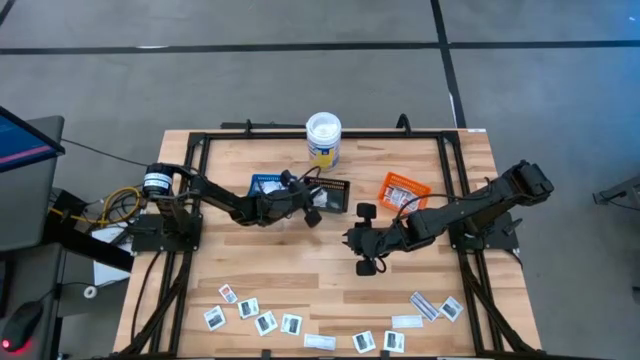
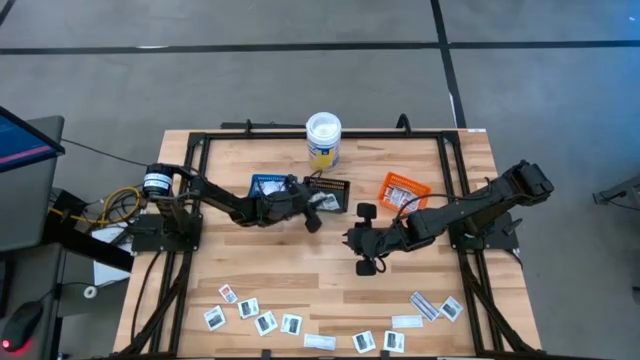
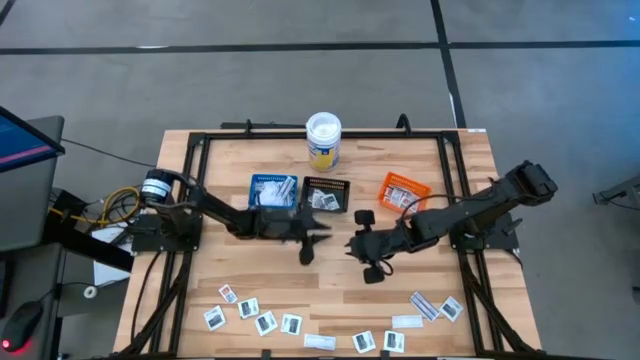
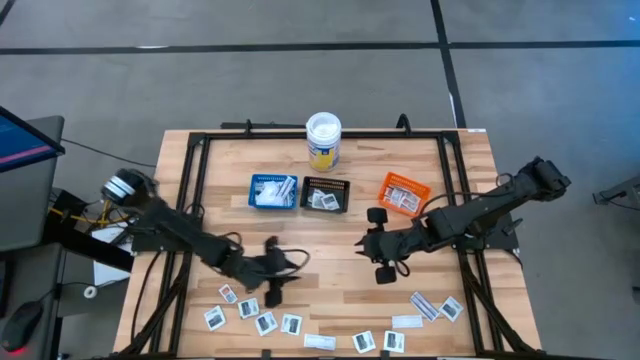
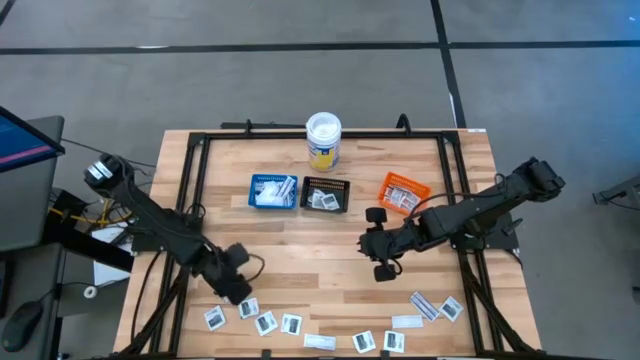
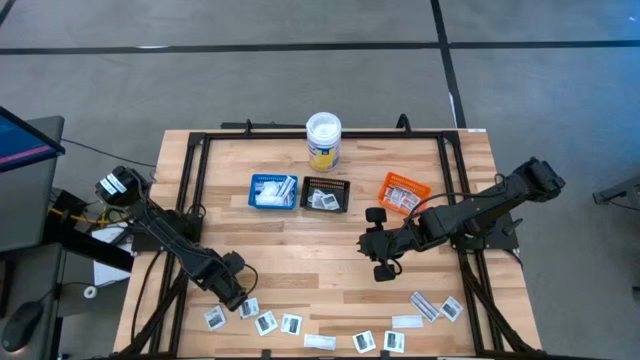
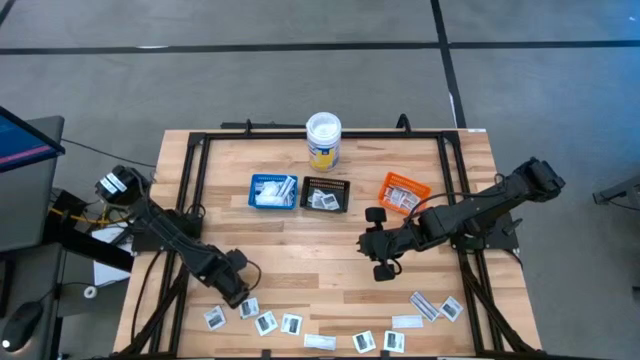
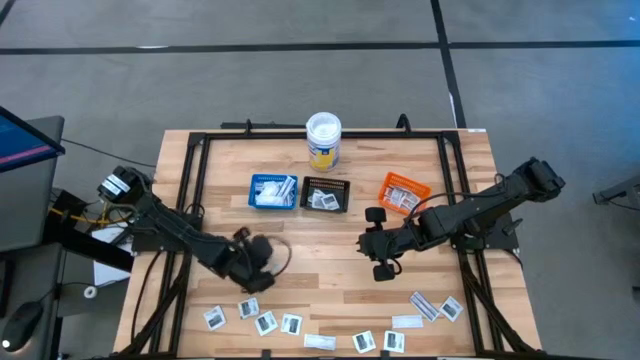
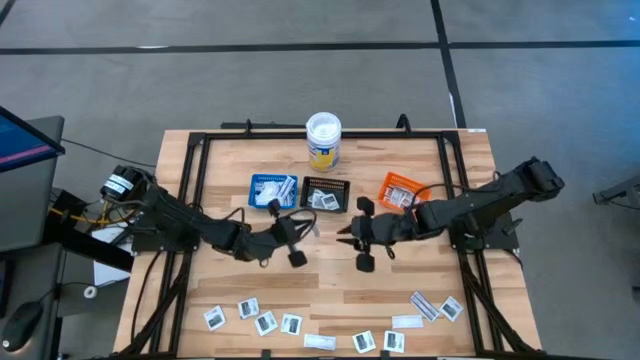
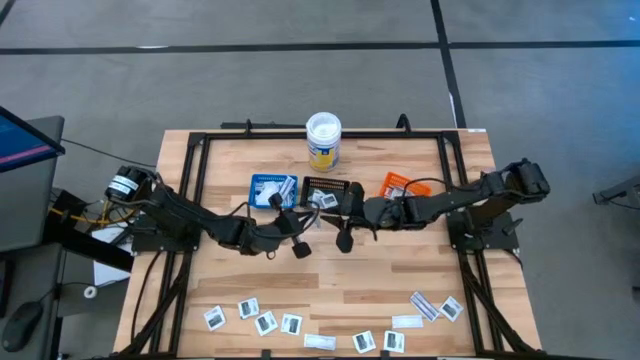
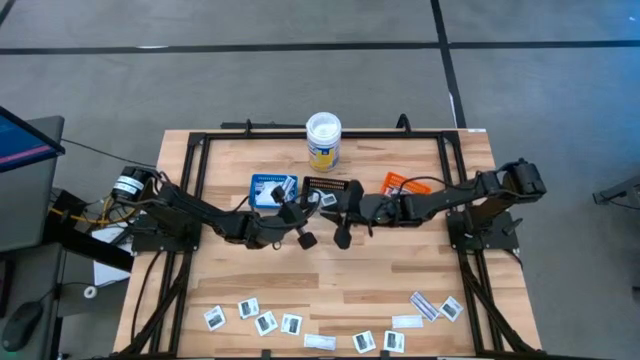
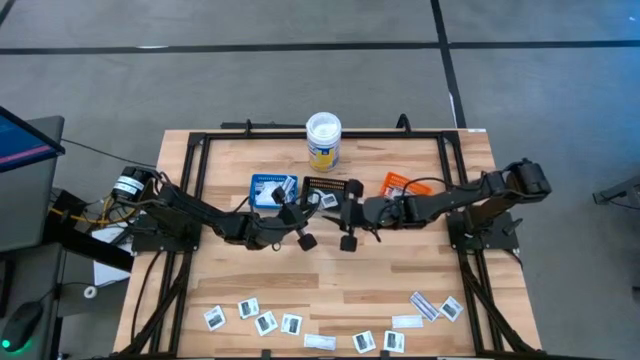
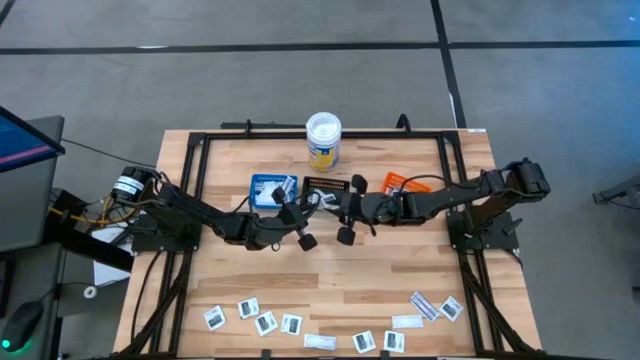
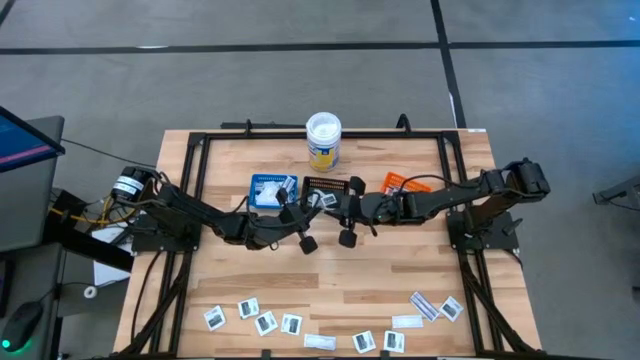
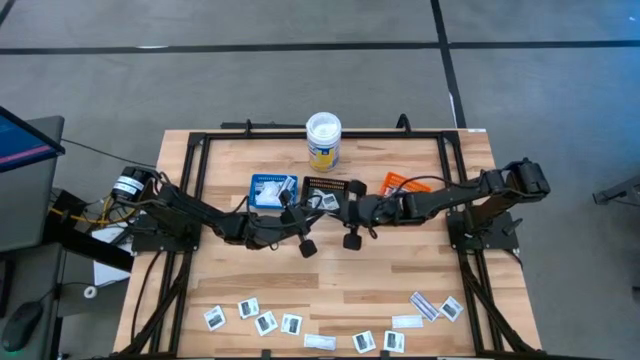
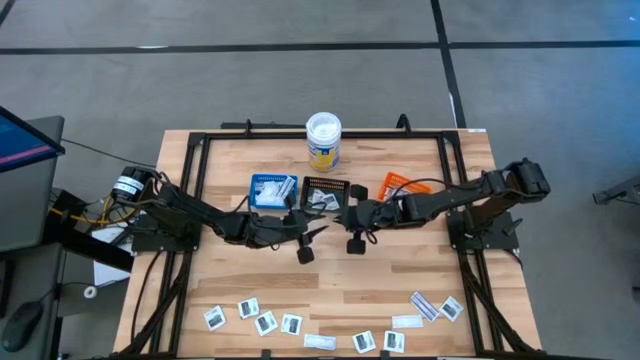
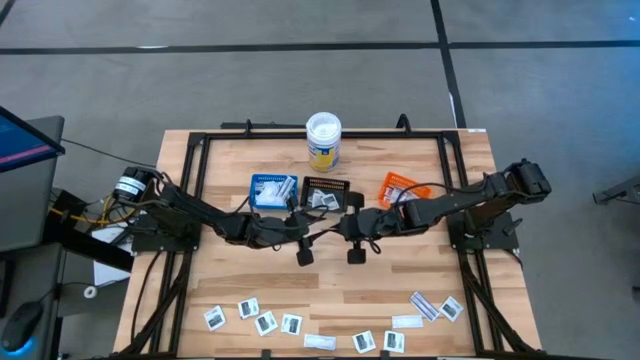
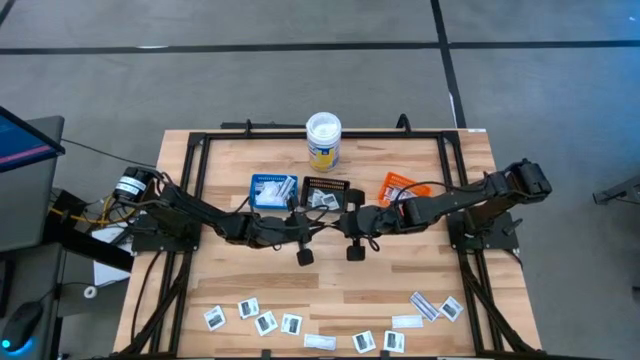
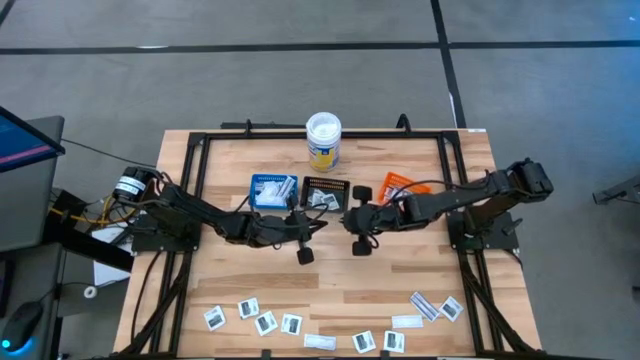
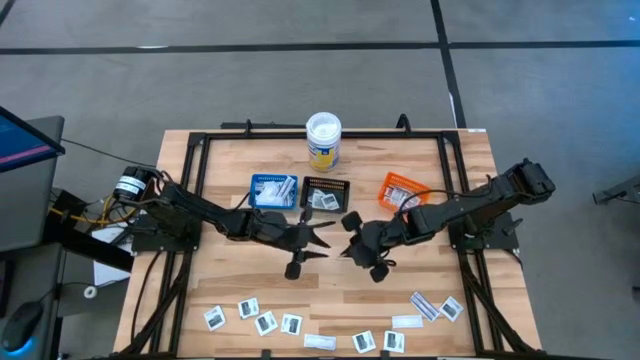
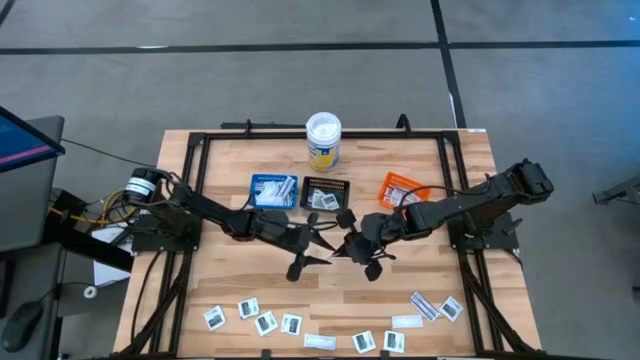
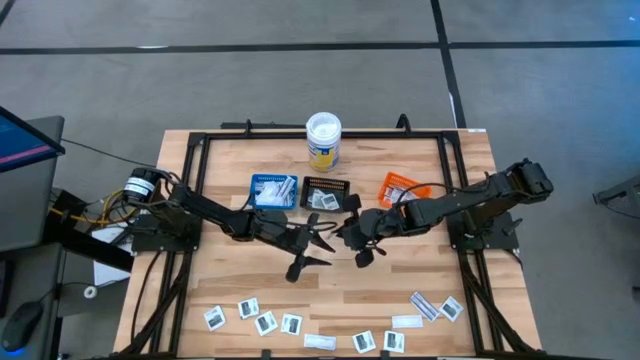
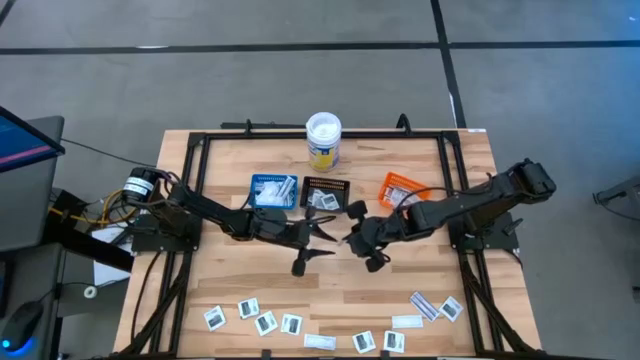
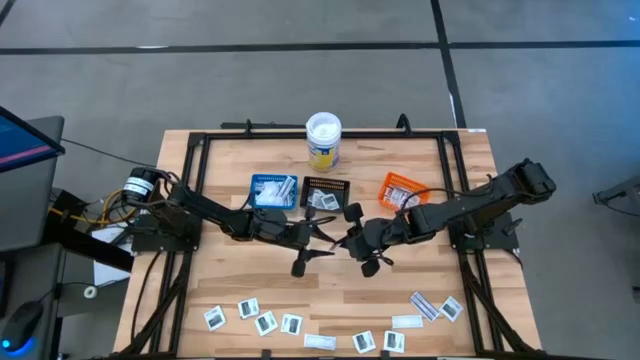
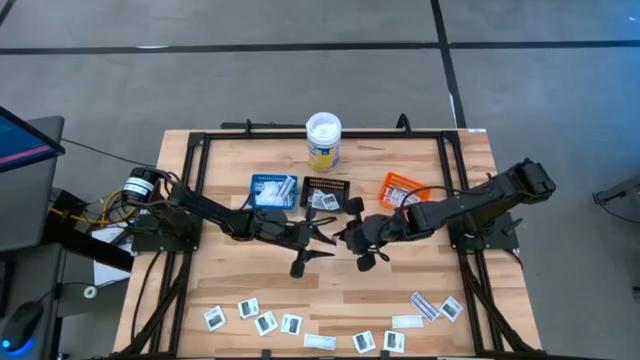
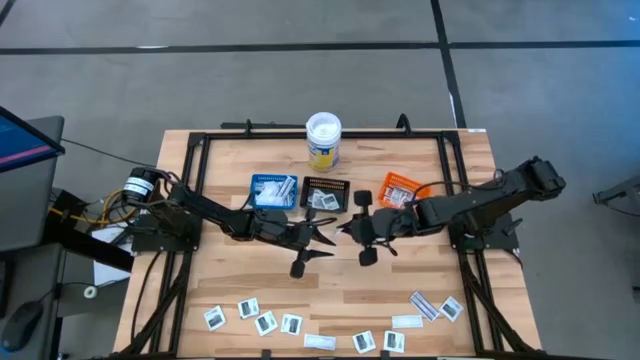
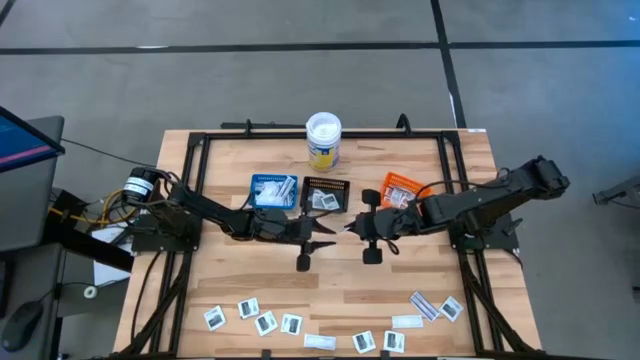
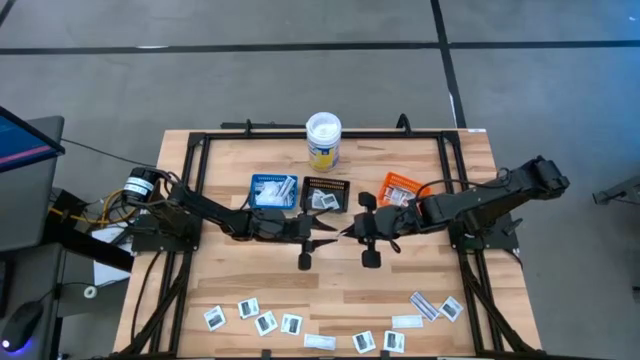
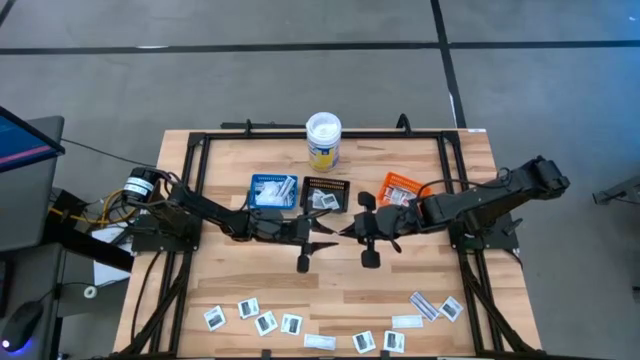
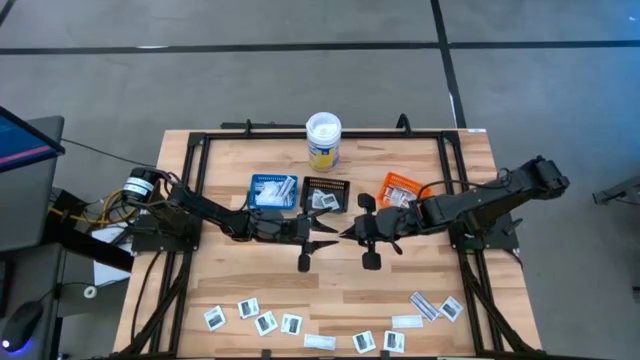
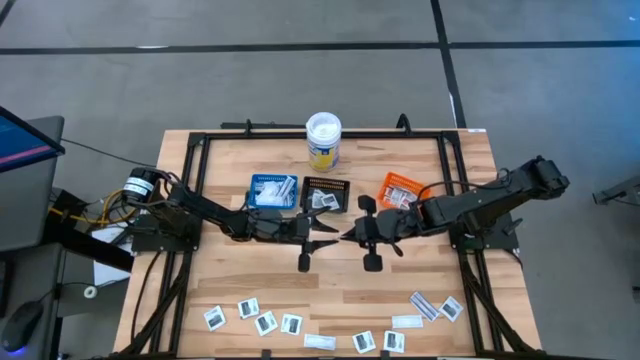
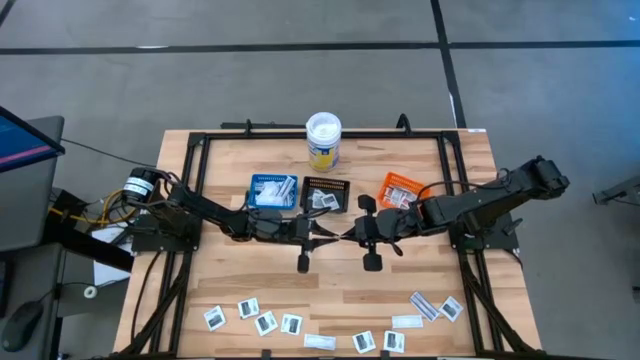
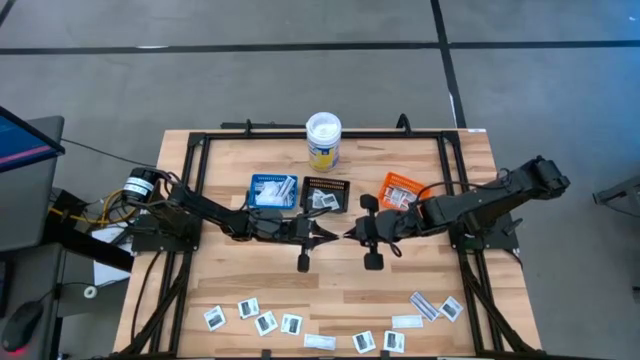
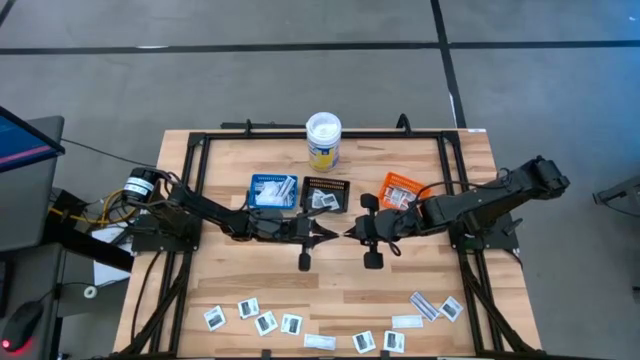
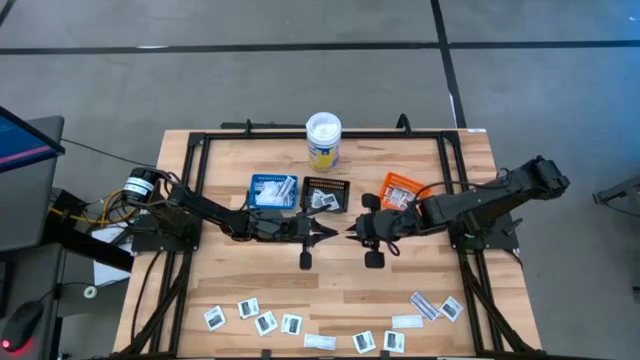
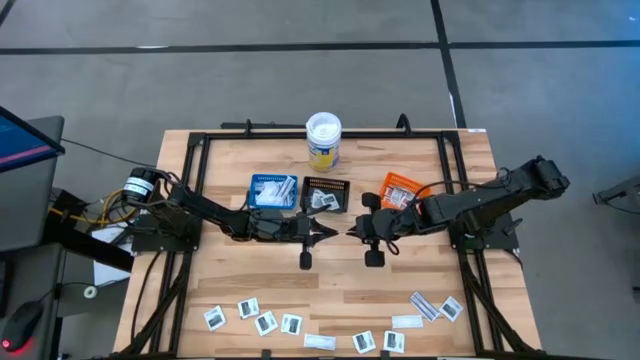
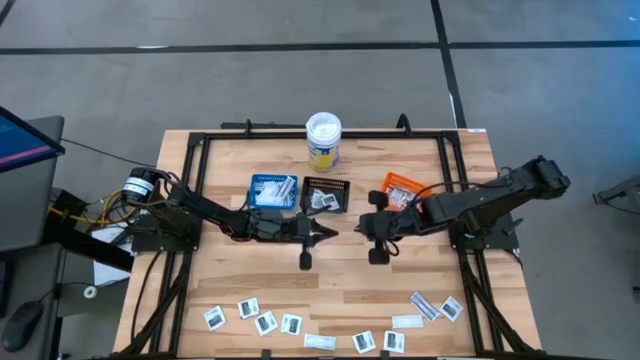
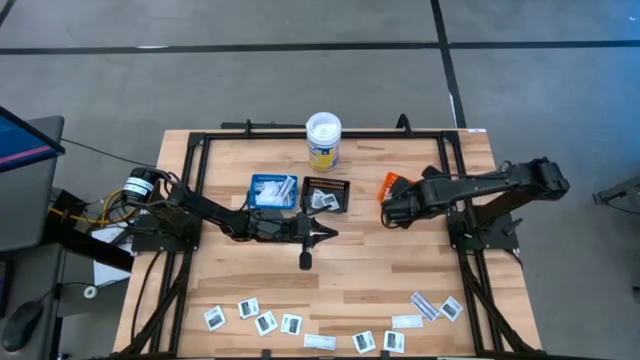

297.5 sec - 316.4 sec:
Task: Pick & Place First Aid Supplies
Put the orange ointment pack into the orange bin

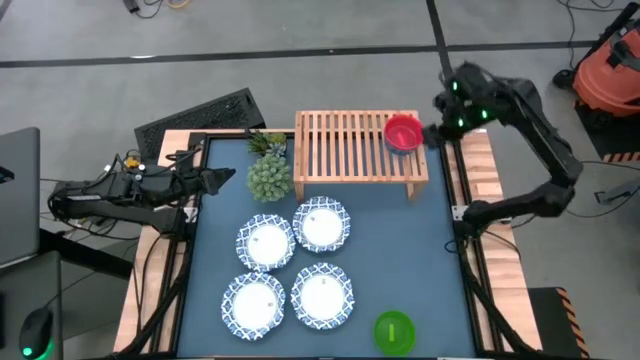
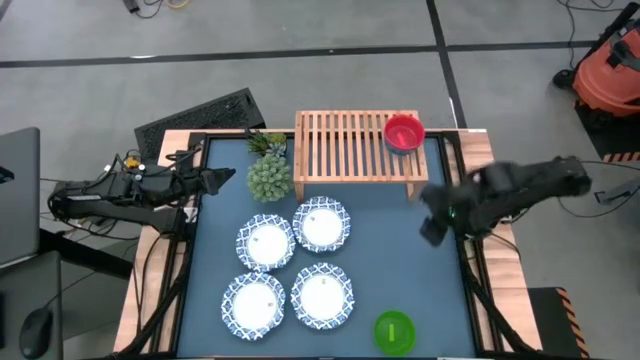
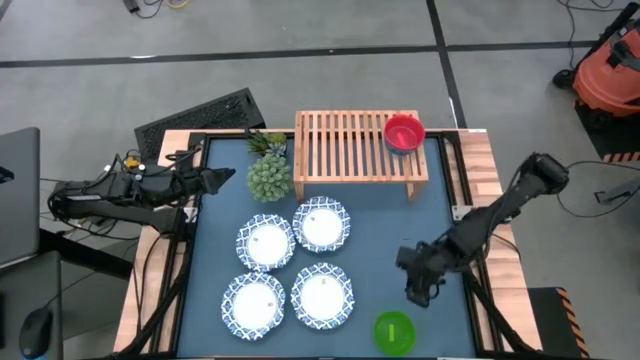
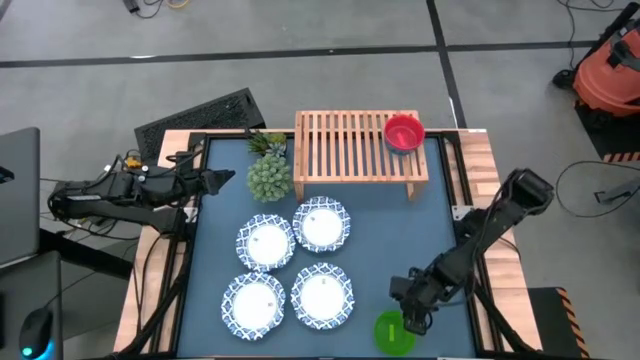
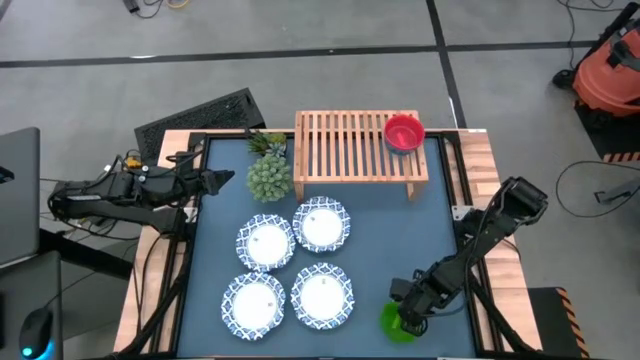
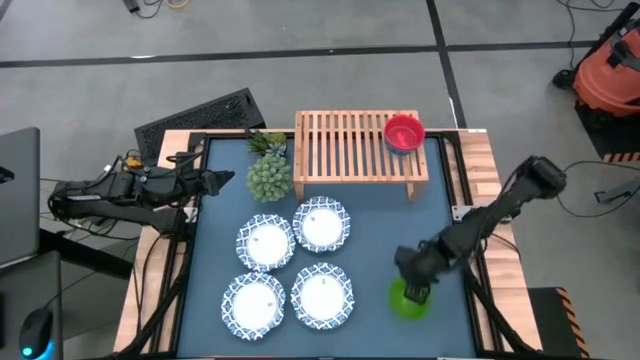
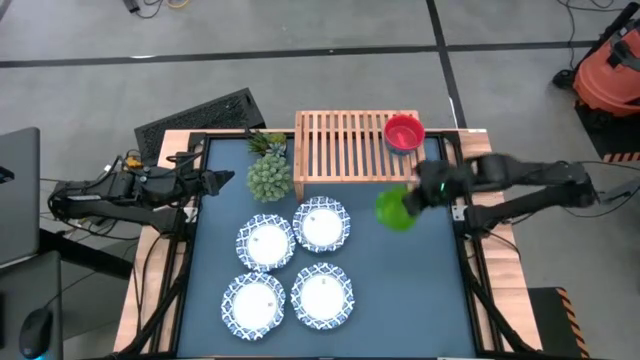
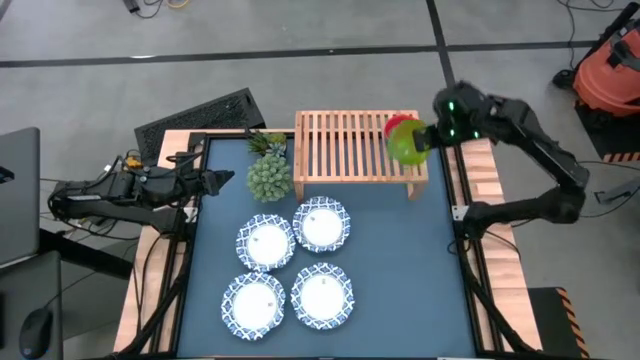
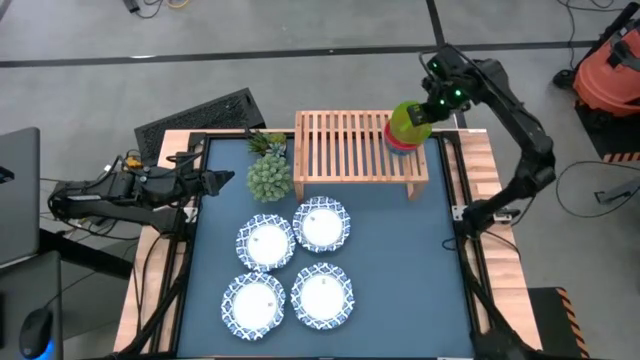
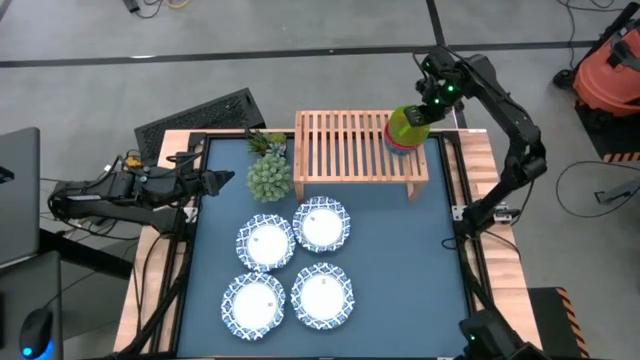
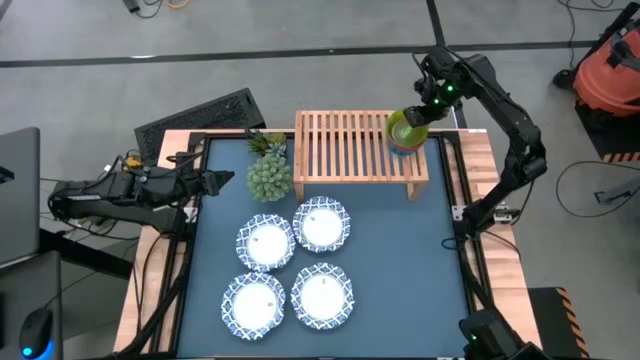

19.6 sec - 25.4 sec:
Task: Place and stack bowls onto a shelf
Stack the green bowl on top of the orange bowl on the shelf
